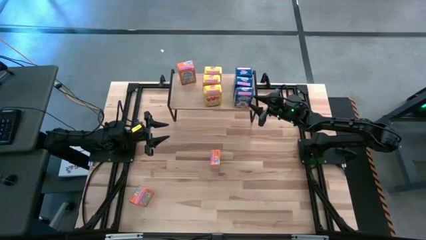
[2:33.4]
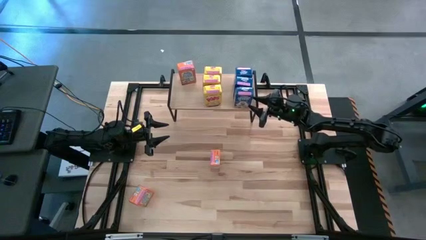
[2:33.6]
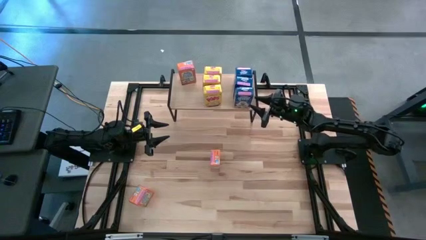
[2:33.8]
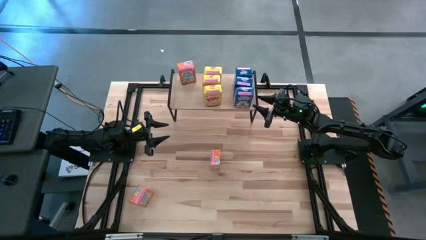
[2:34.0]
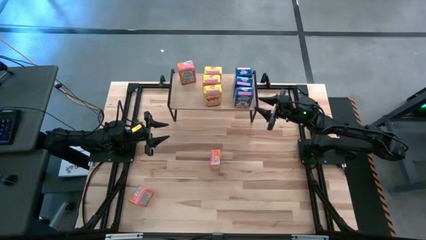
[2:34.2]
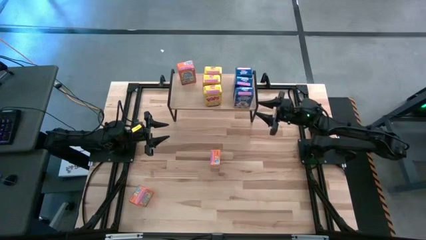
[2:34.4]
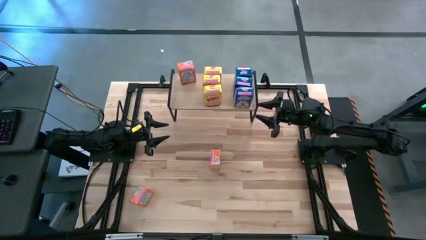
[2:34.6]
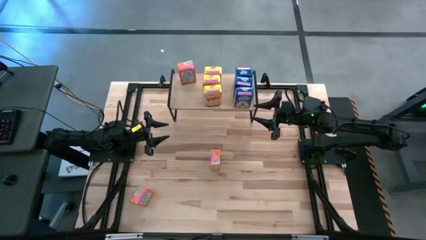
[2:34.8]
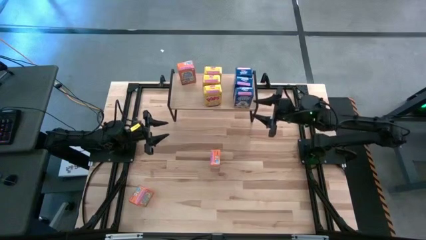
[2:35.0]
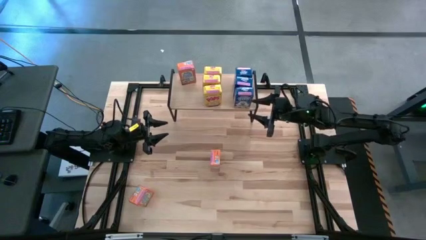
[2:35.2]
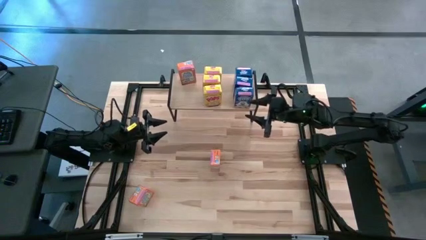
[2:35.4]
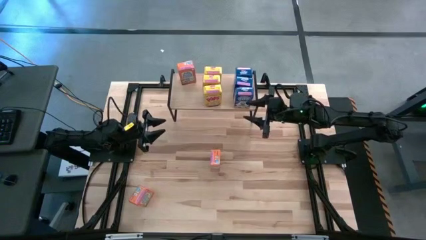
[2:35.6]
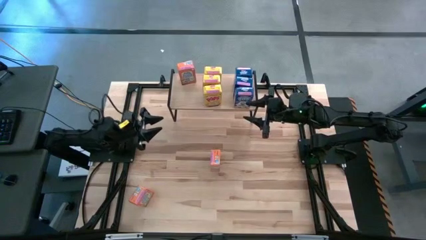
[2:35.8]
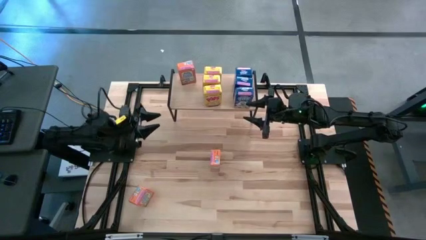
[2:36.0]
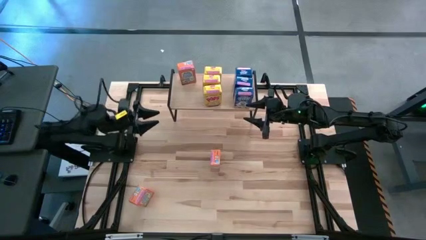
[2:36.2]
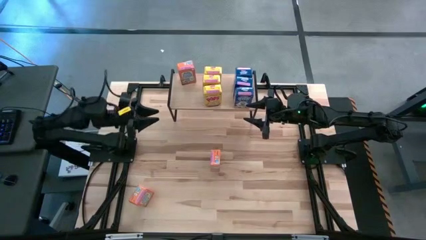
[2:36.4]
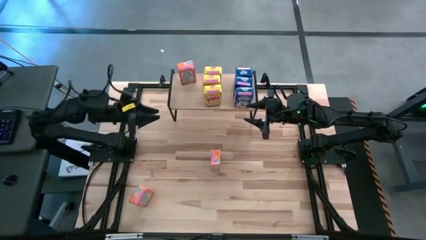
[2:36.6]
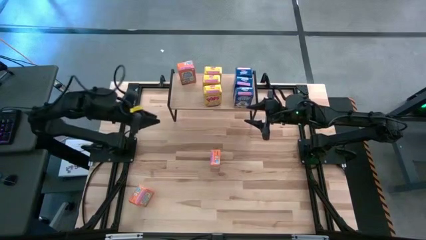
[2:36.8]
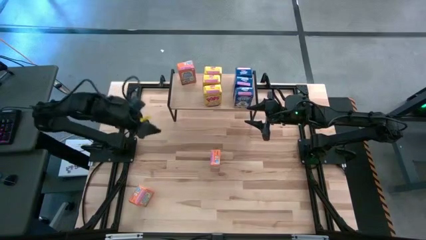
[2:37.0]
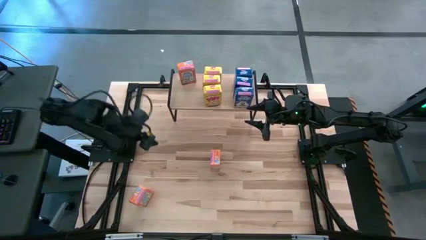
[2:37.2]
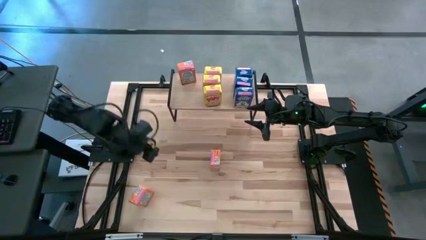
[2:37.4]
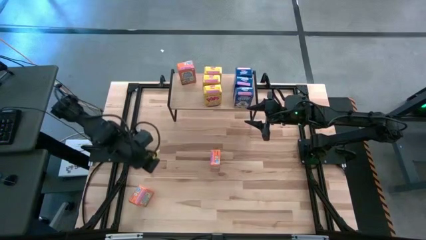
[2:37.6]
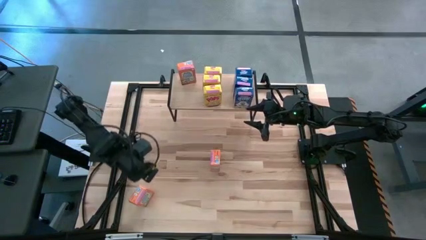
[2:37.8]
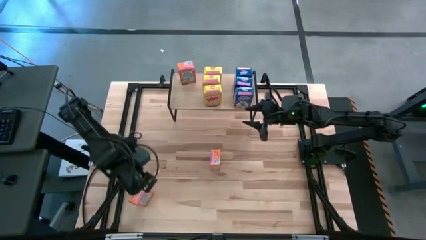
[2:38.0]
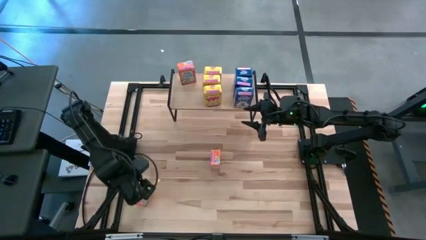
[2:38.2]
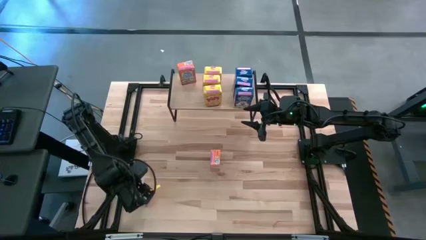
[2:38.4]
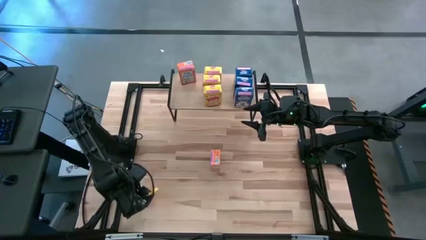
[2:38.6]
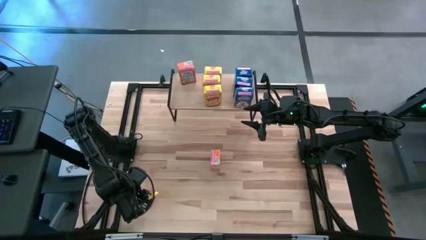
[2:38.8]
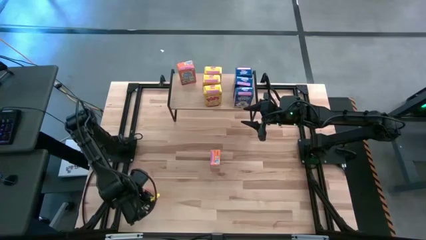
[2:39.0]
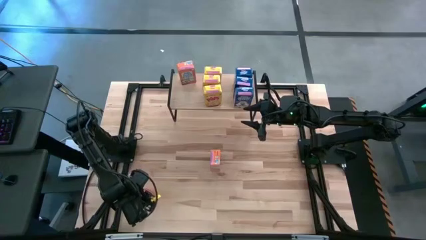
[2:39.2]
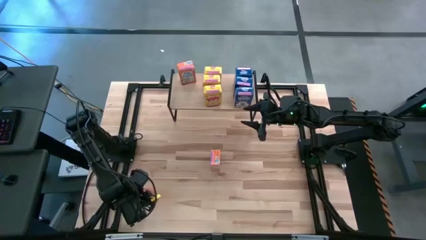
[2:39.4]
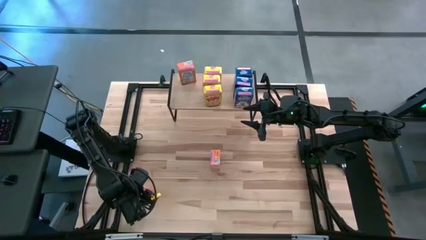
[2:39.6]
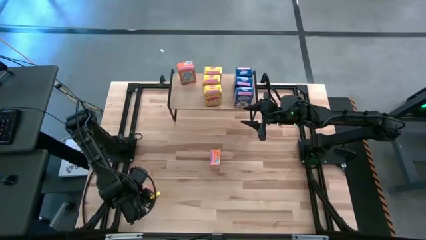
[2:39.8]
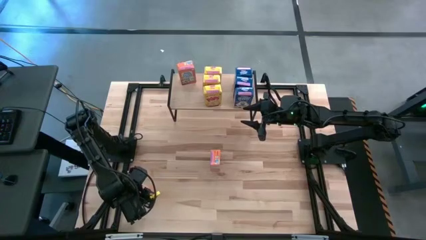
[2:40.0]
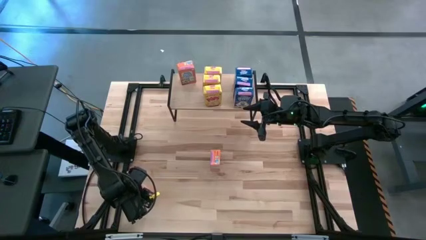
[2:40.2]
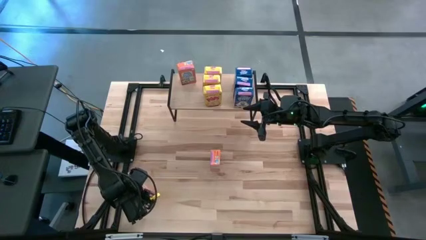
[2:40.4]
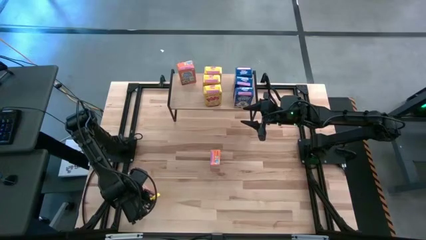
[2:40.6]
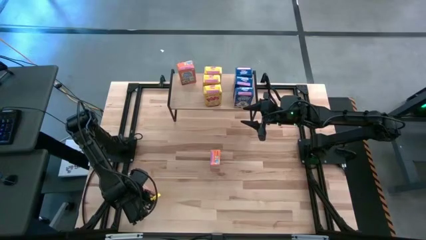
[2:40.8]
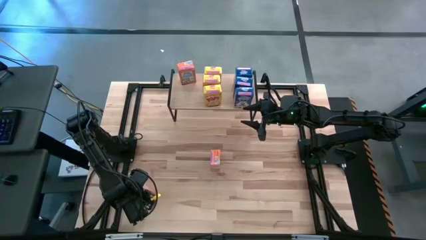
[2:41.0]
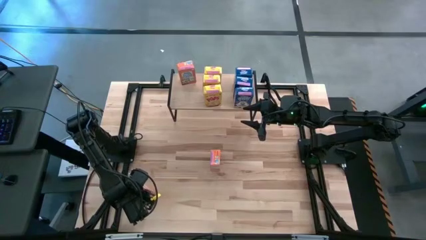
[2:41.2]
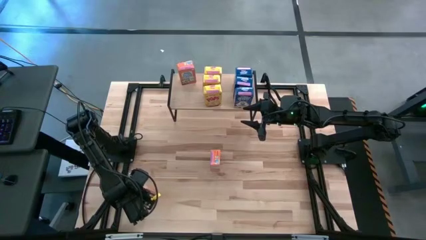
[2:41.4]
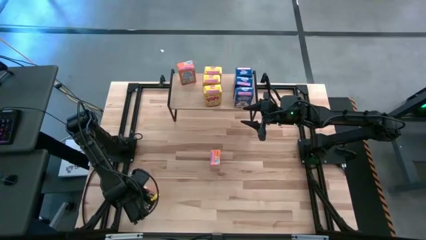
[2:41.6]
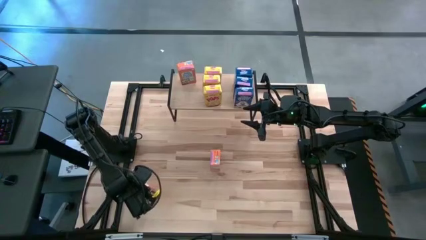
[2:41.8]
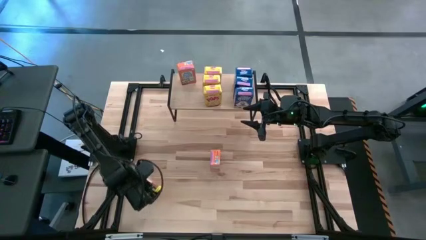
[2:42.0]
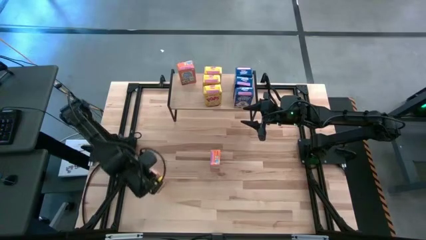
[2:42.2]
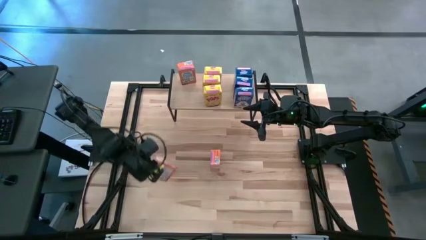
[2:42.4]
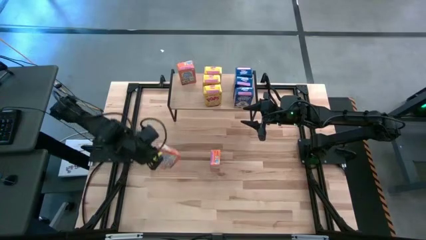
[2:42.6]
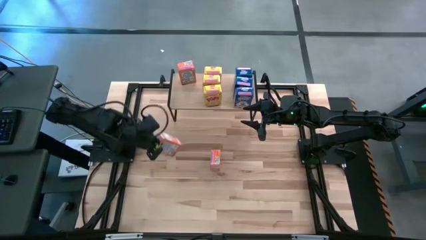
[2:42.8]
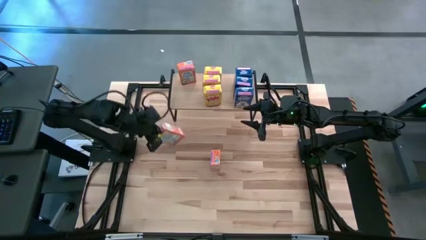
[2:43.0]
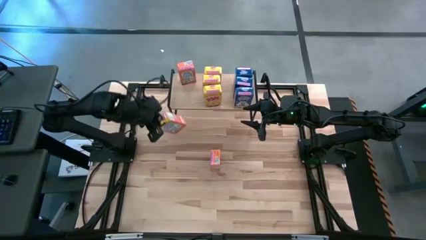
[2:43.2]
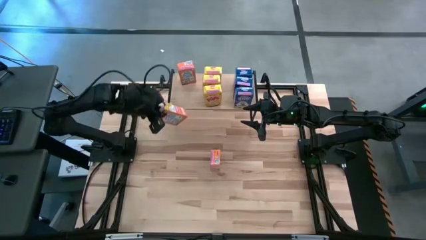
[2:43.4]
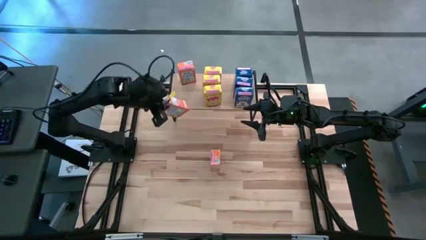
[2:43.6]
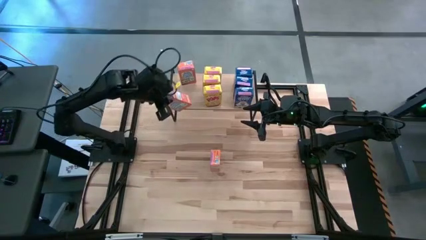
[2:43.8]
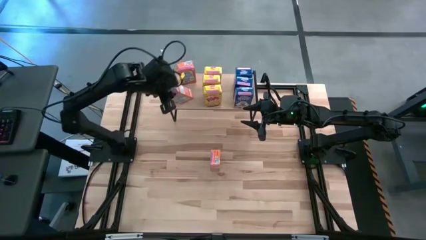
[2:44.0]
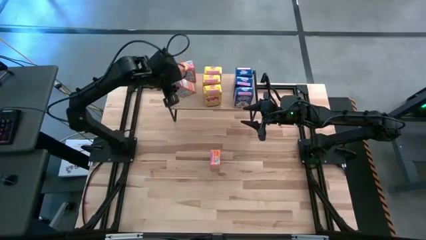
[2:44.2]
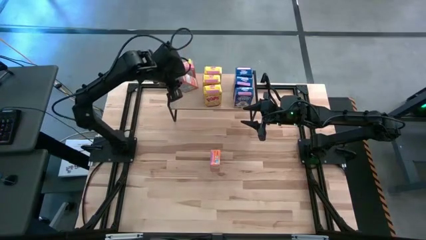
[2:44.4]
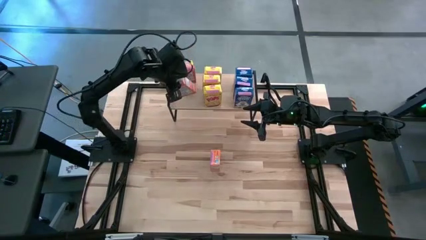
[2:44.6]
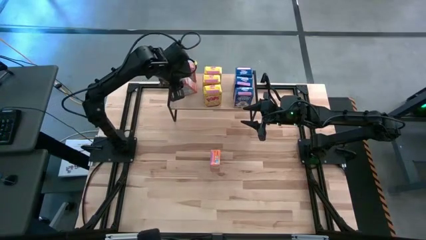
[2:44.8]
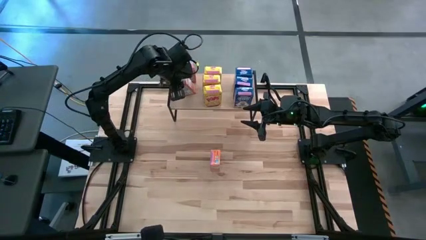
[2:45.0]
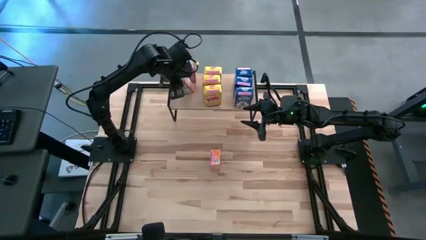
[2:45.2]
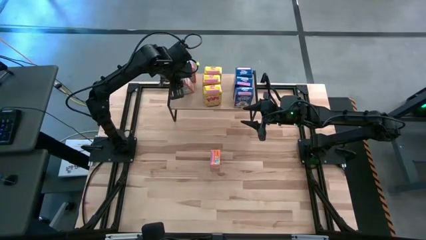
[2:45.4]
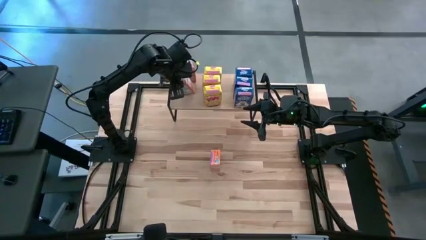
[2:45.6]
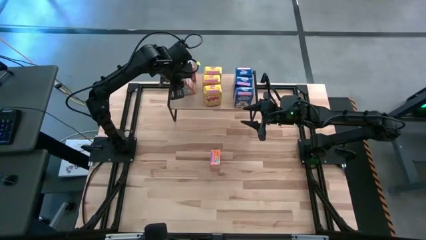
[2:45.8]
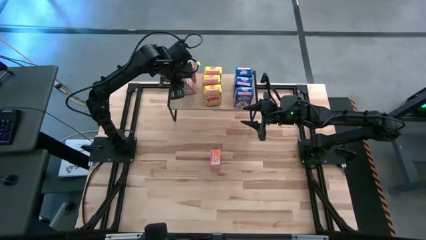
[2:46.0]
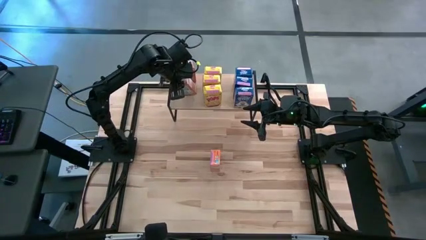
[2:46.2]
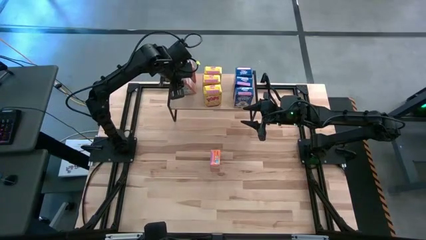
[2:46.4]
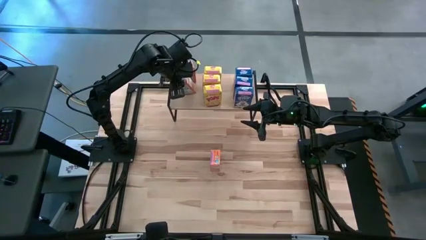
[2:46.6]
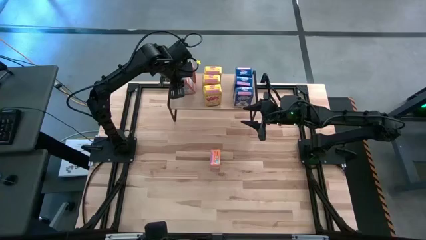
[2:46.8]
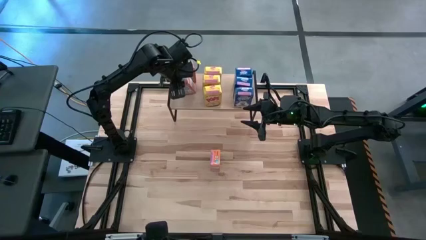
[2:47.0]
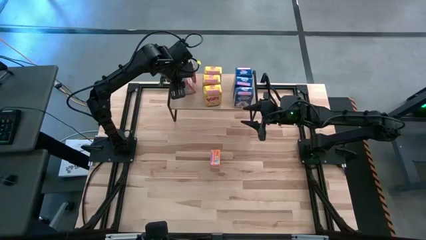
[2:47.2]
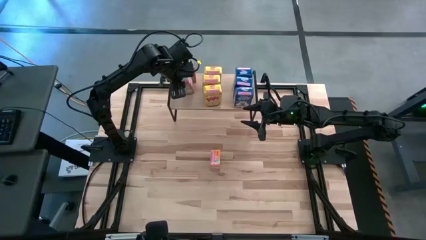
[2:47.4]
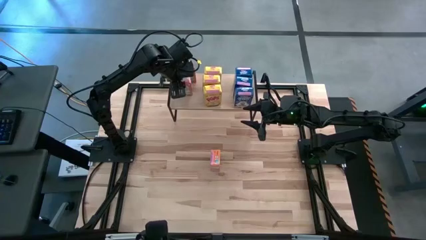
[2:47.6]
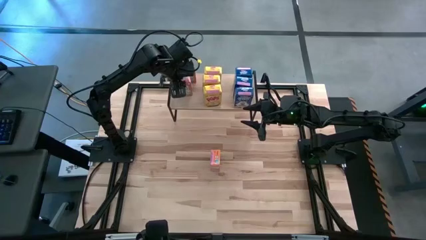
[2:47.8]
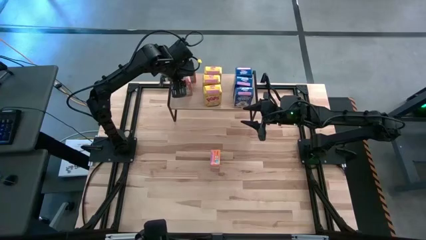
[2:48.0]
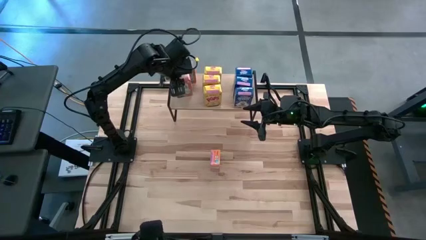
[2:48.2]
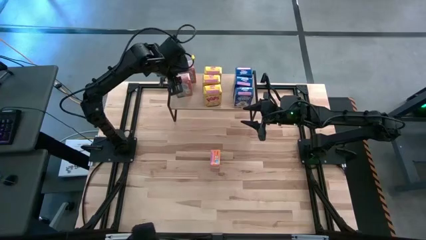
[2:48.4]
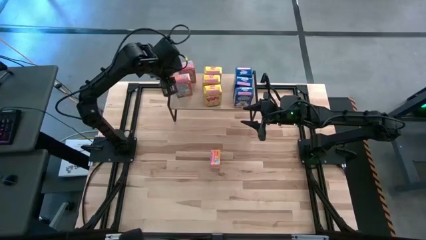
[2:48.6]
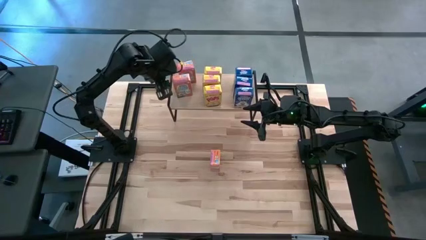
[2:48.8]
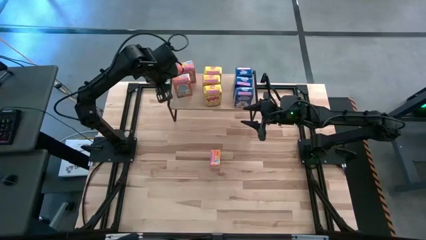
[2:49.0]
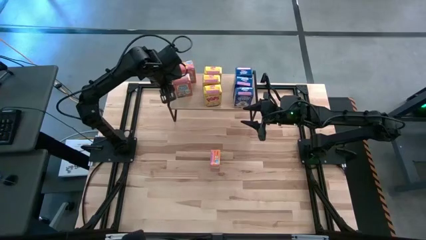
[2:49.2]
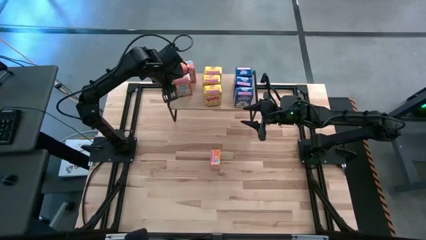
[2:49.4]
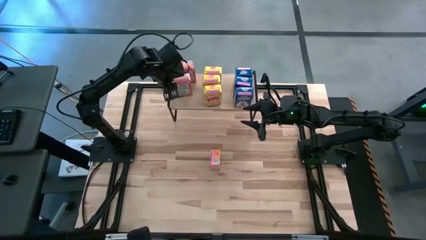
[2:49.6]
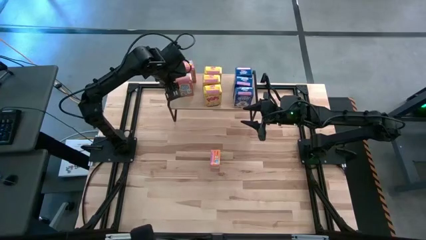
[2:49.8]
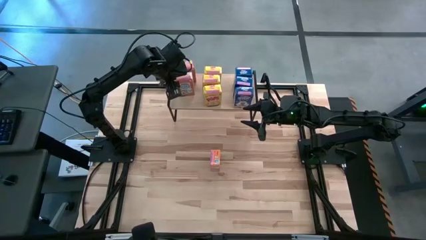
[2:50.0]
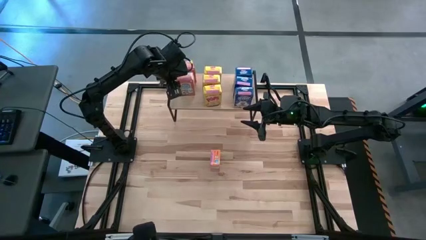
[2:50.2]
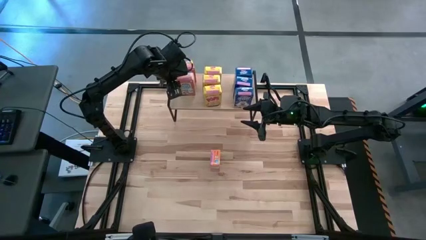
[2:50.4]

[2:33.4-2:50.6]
Task: Stack cereal on shelf
Put the bottom orange cereal box on the shelf aligned with the other orange cereal box
